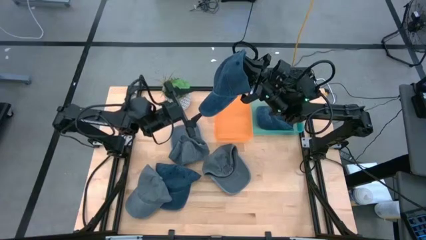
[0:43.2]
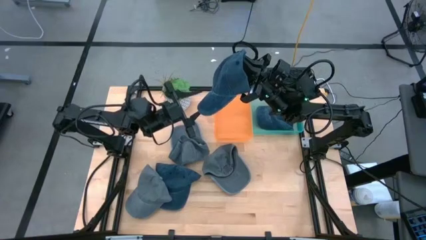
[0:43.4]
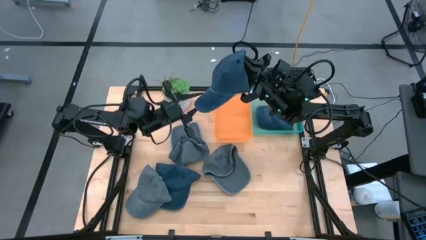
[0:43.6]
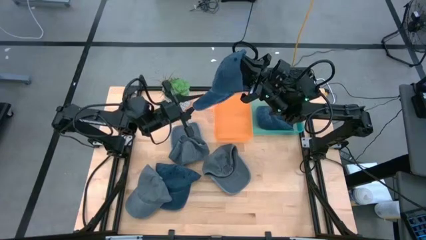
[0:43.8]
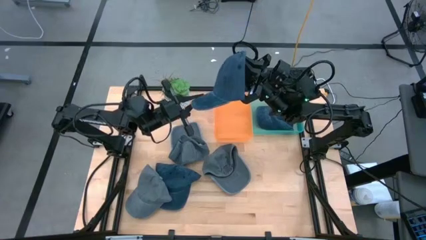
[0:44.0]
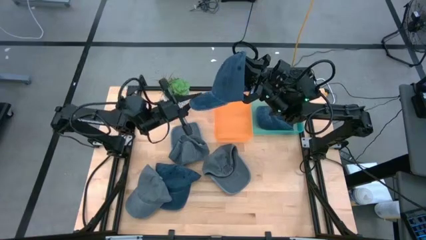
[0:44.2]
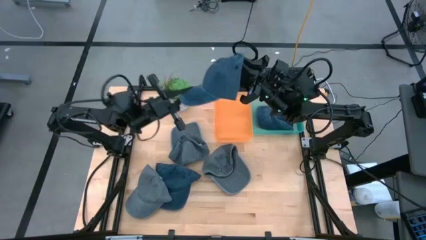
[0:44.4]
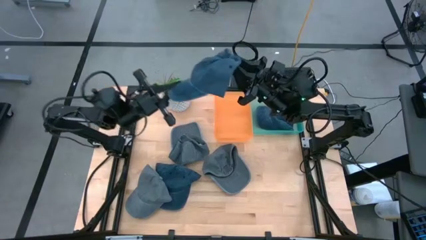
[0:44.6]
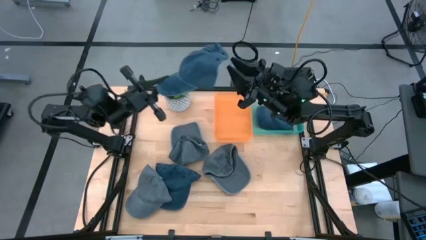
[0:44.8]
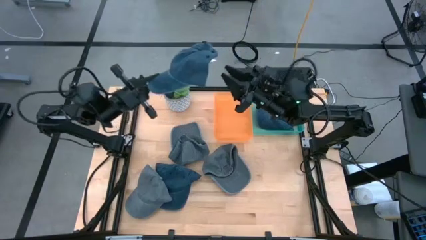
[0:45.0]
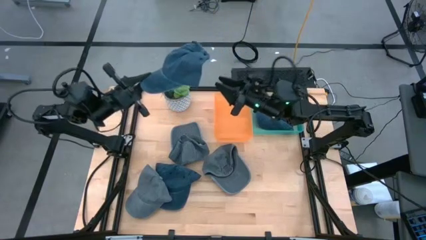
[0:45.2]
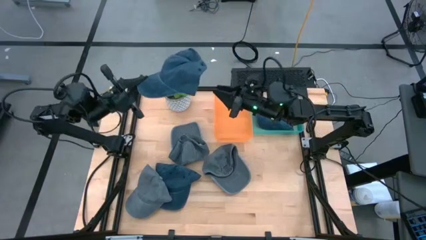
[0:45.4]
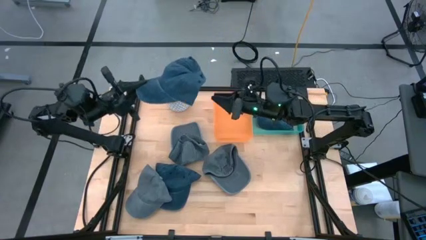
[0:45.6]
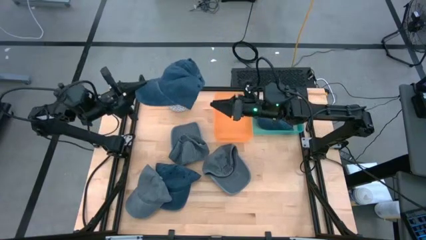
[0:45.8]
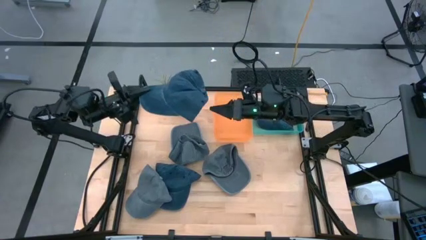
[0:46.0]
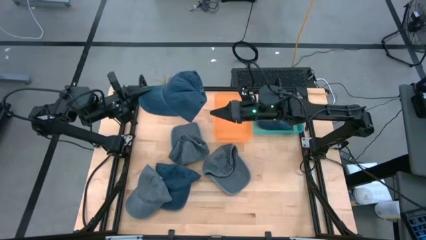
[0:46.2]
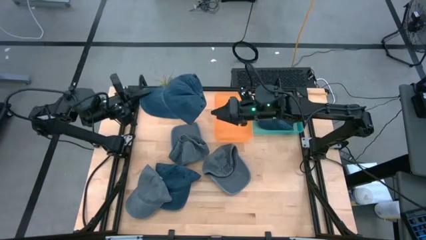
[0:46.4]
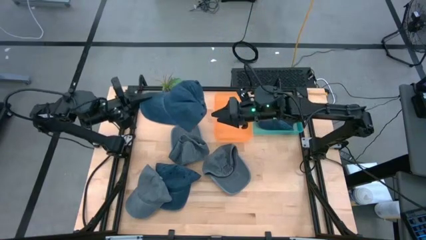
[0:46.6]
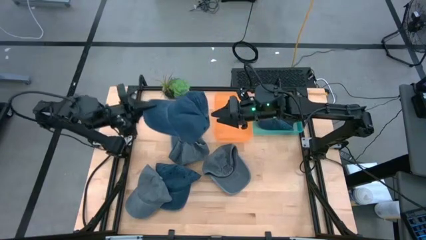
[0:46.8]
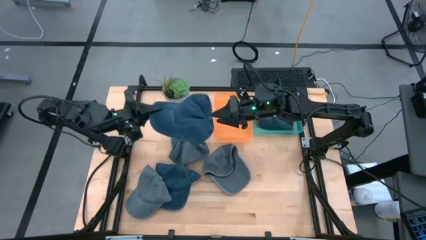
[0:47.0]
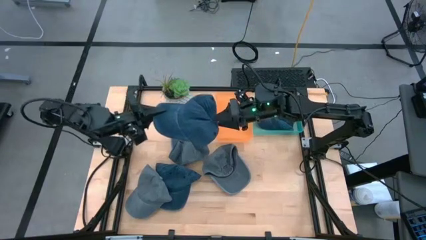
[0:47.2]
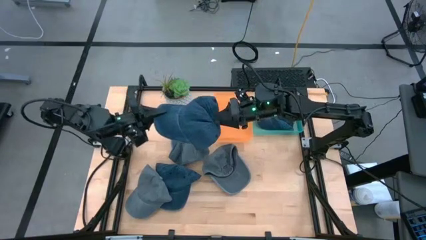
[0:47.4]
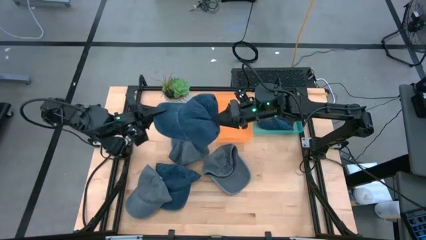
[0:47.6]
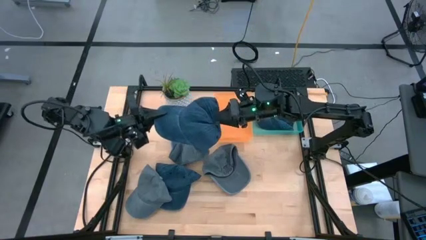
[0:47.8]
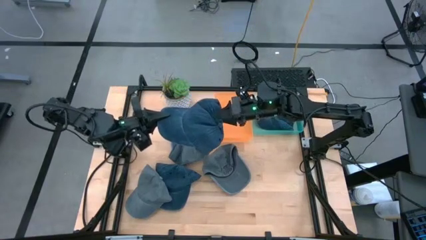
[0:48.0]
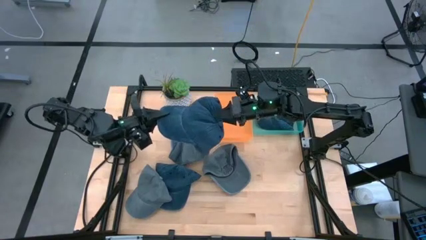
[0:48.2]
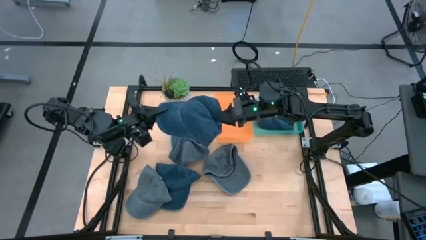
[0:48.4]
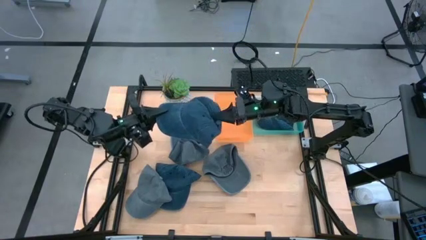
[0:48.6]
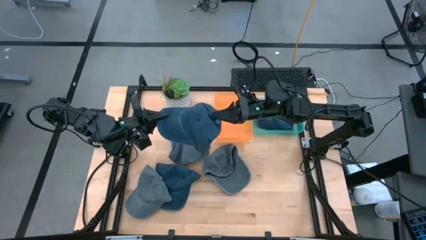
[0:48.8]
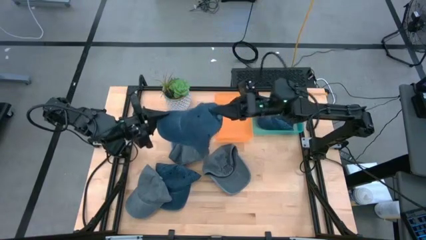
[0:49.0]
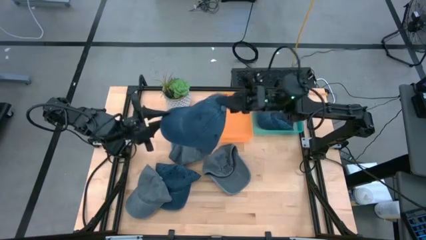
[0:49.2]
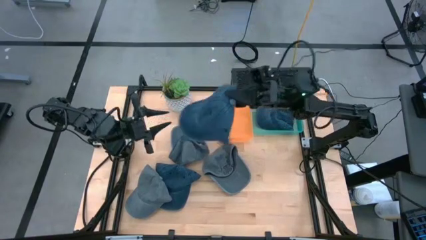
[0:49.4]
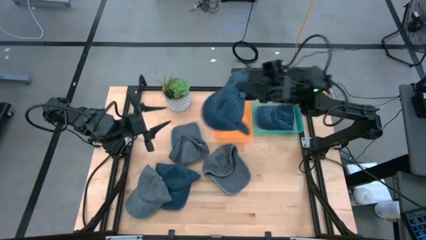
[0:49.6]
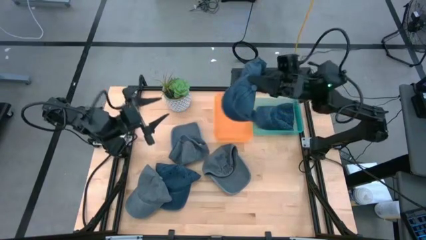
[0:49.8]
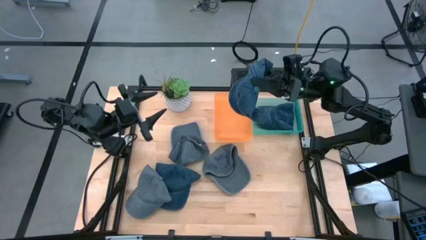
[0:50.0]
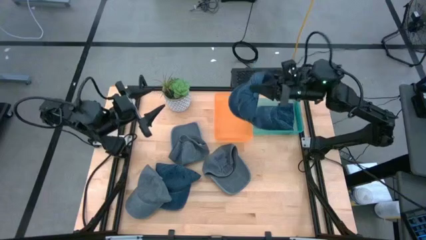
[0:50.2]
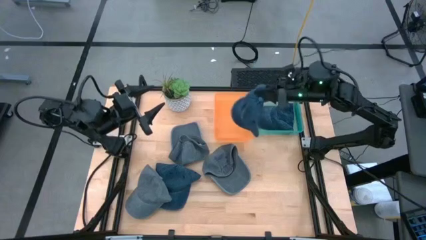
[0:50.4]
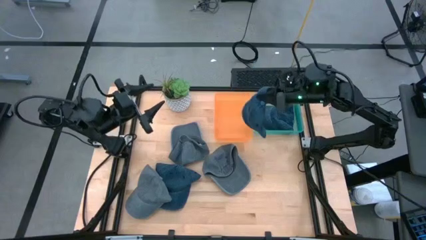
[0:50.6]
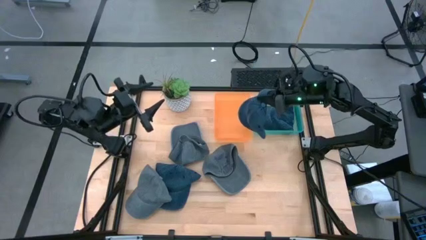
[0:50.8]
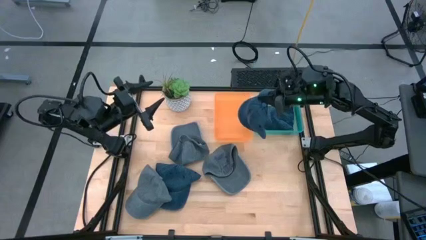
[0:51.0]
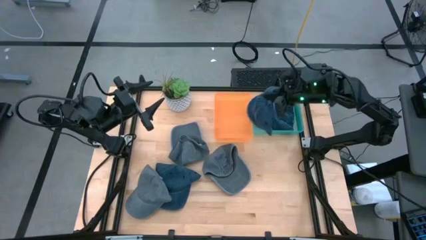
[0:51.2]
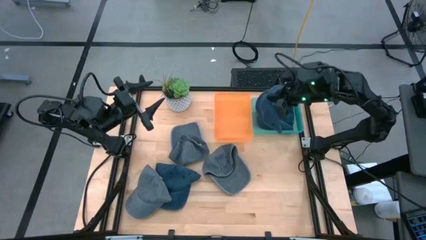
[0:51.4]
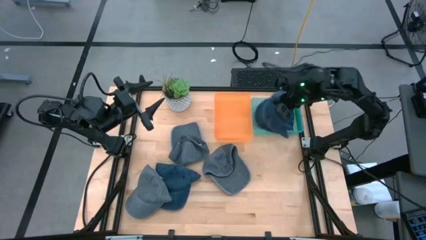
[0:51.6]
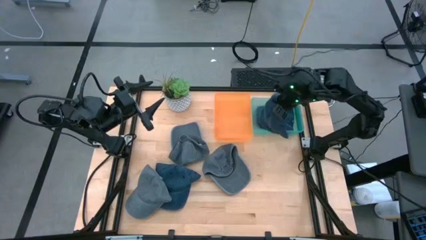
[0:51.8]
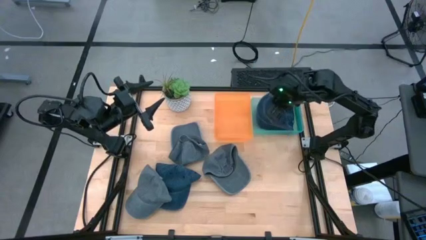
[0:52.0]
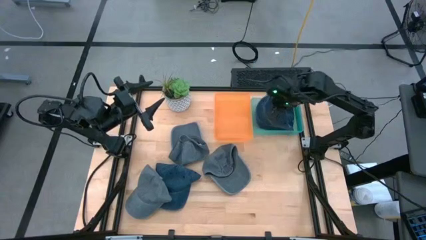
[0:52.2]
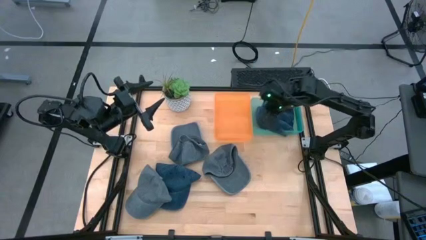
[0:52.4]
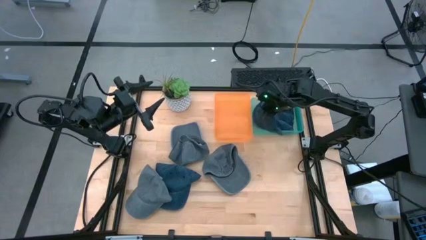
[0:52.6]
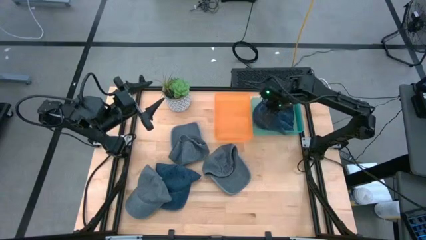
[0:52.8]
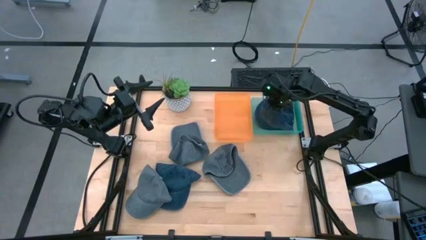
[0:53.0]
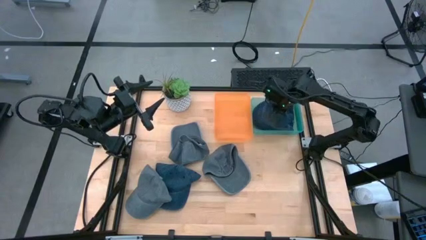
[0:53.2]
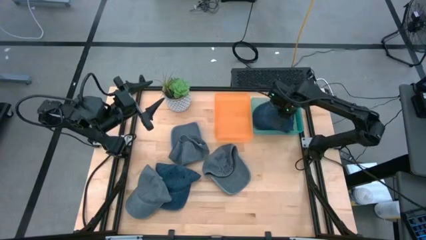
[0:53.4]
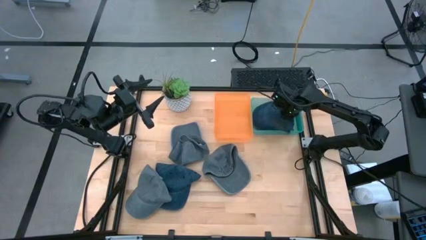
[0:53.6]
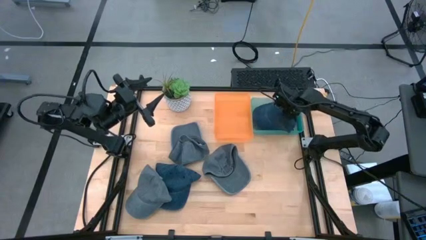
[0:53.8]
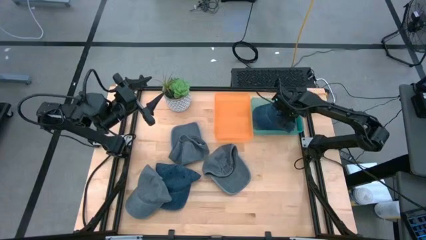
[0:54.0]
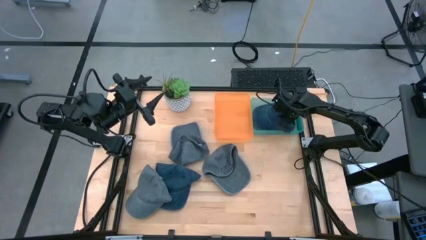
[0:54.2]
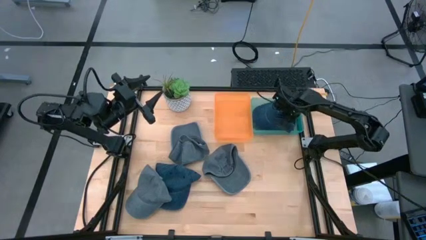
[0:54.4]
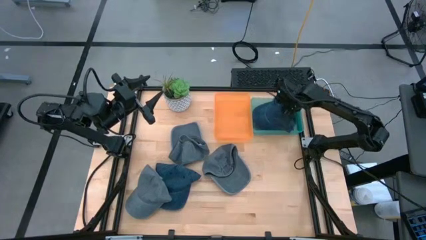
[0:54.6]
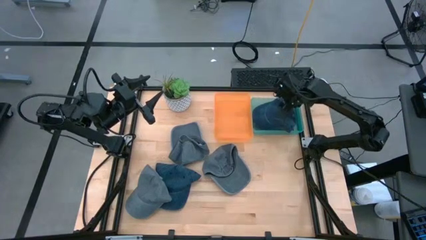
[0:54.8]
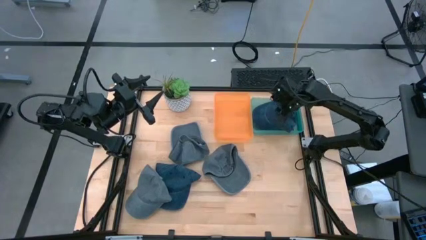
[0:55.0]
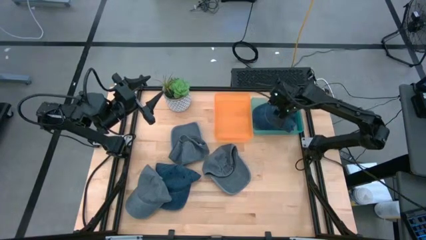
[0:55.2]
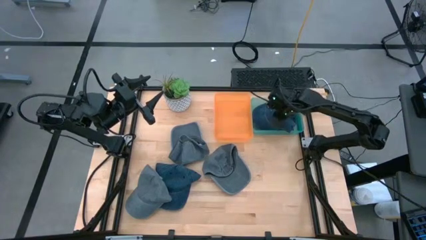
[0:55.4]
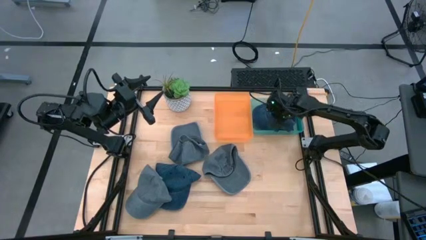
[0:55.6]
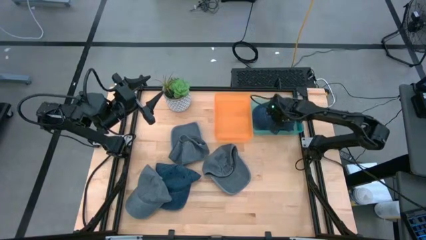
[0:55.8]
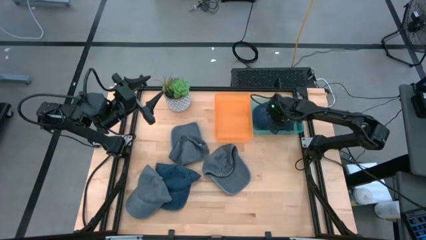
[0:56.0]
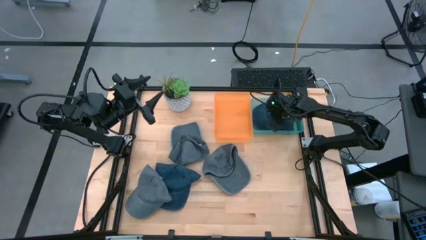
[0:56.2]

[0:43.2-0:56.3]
Task: Pick & Place hat
Put the right blue cap in the blue bin

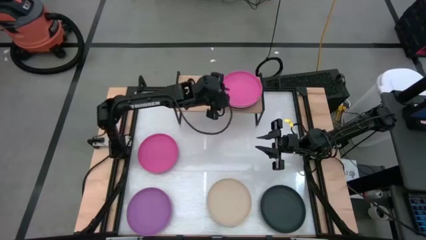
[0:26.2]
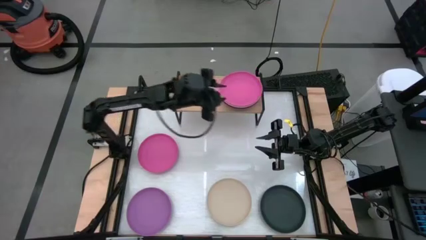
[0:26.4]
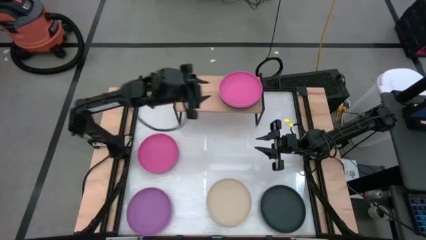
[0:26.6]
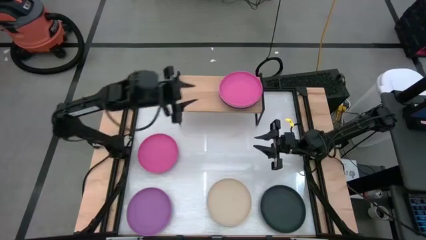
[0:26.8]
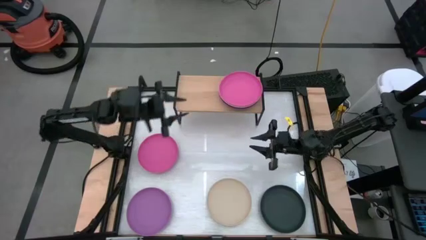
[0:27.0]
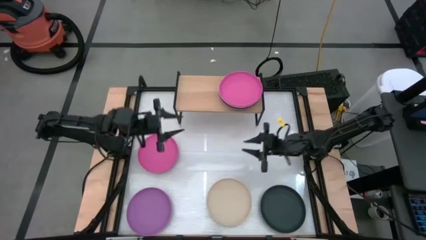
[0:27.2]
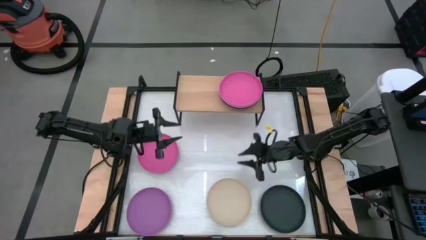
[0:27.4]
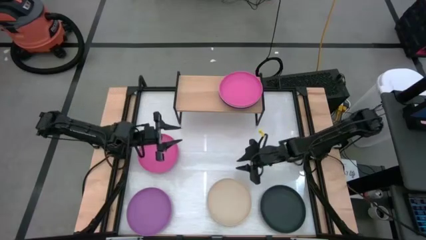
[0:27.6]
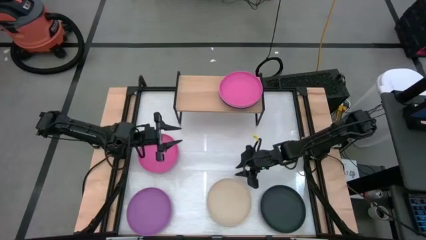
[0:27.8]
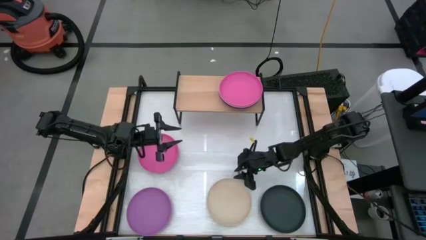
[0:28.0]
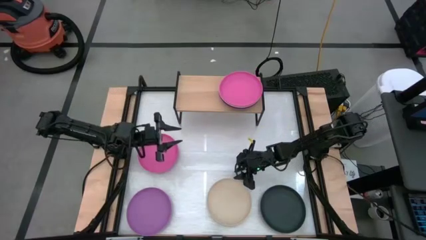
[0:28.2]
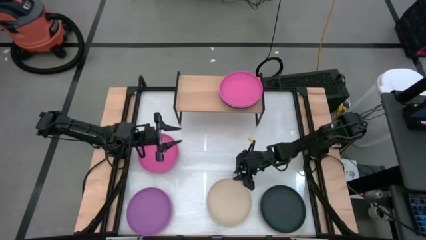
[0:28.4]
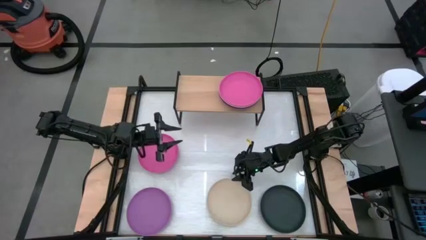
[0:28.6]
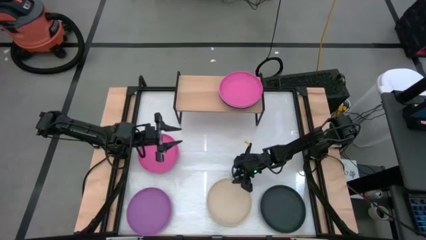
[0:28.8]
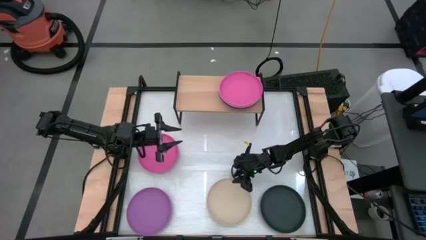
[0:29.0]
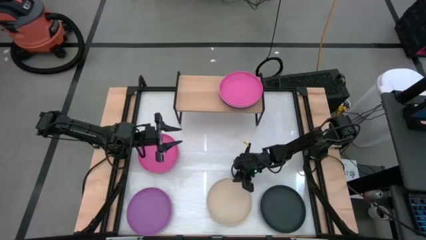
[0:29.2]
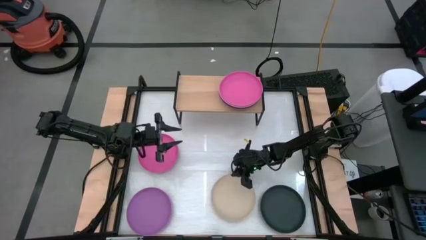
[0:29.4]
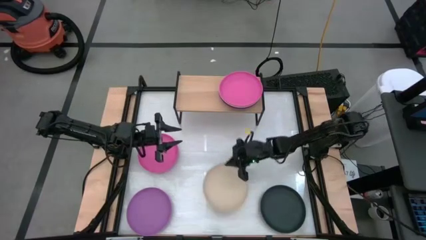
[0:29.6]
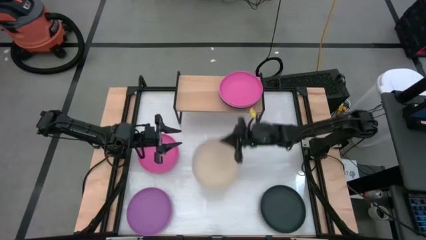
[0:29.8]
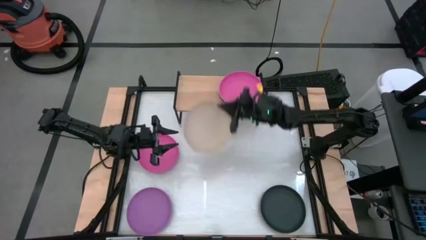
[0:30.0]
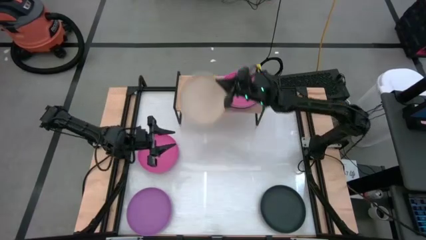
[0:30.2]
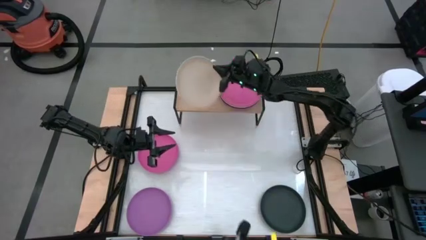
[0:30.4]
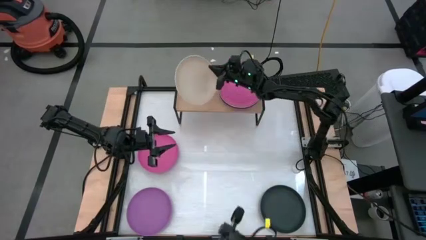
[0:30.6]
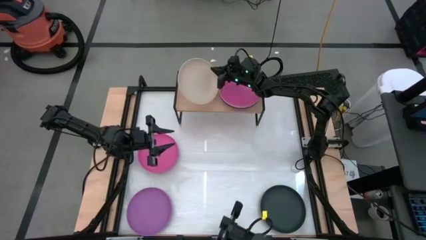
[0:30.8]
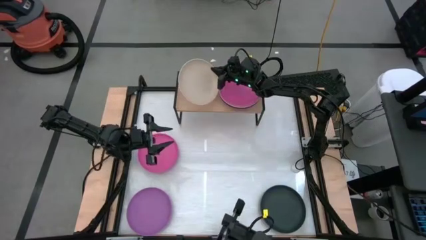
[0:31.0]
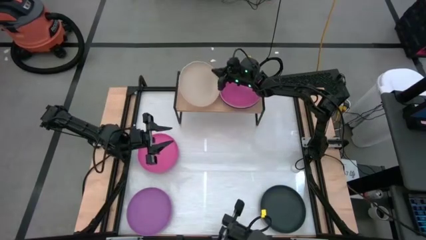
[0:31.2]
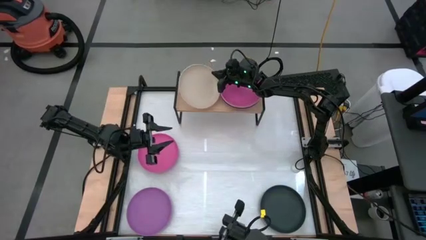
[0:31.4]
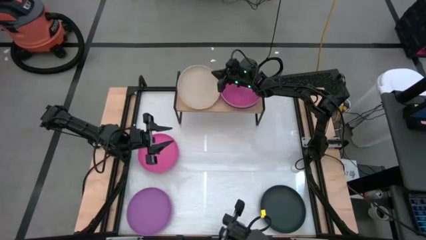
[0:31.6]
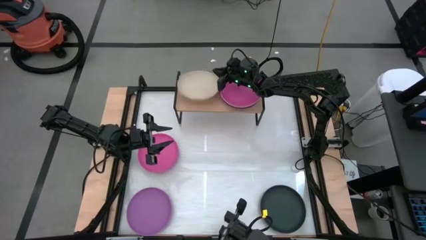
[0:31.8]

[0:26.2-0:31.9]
Task: Place and stack plates onto a shelf
Put the white plate on the shelf
